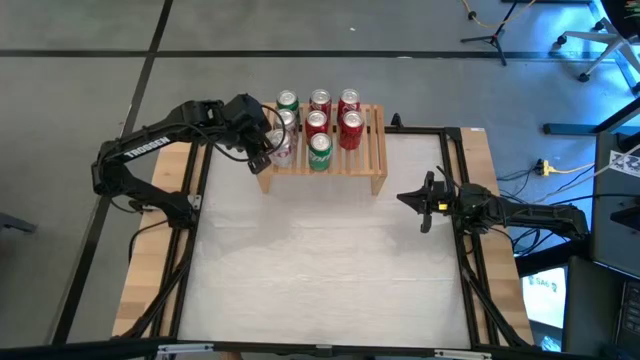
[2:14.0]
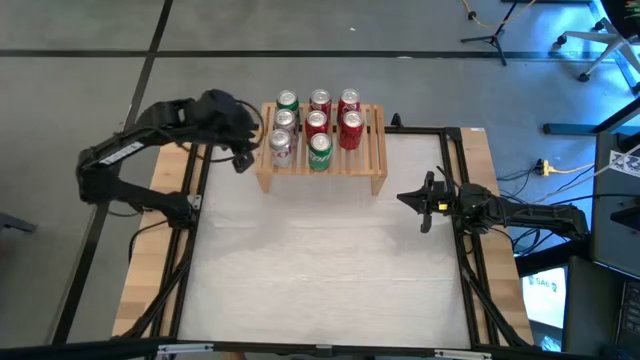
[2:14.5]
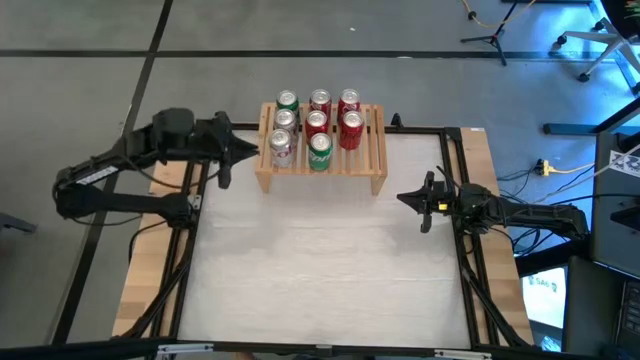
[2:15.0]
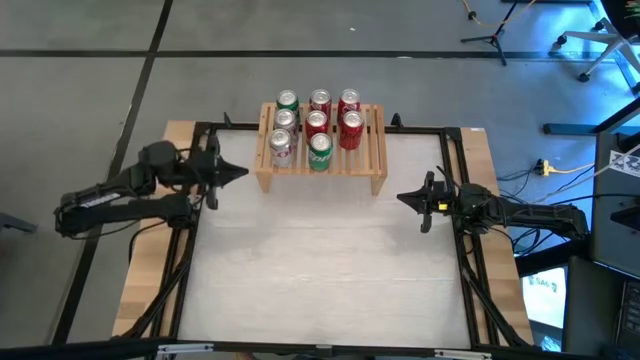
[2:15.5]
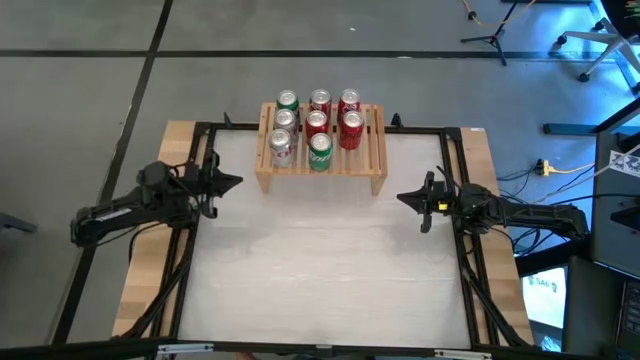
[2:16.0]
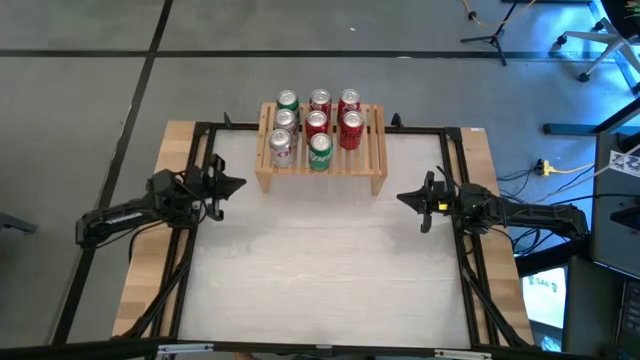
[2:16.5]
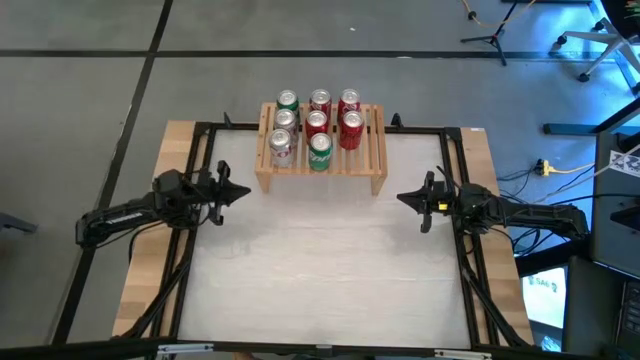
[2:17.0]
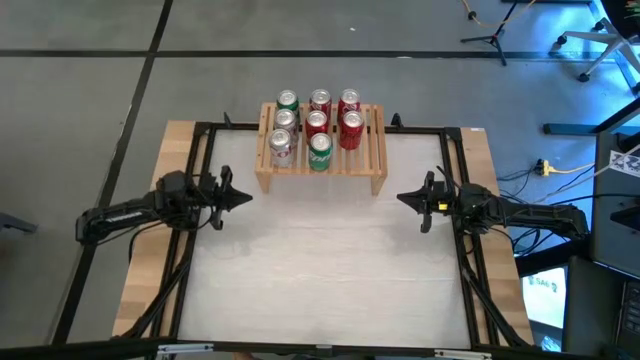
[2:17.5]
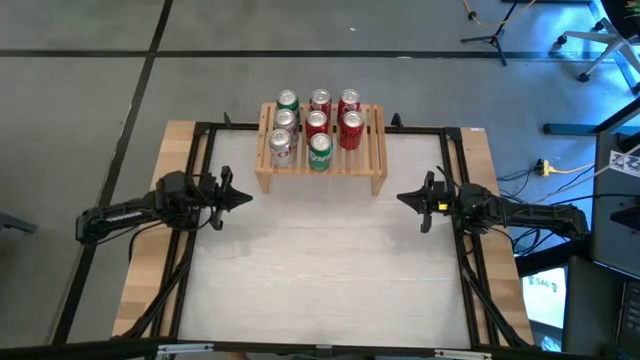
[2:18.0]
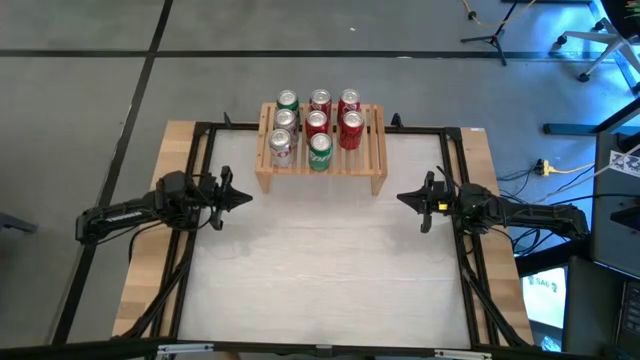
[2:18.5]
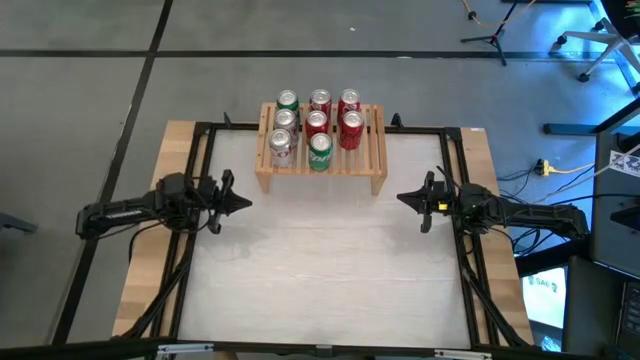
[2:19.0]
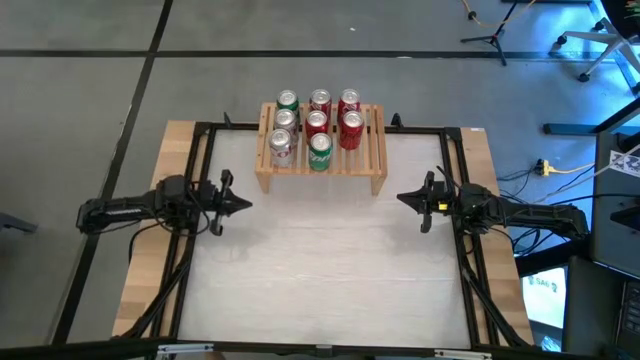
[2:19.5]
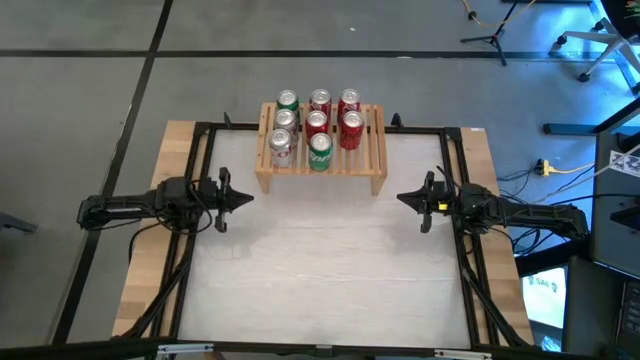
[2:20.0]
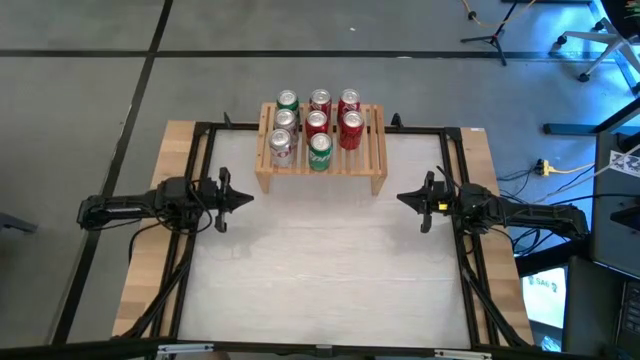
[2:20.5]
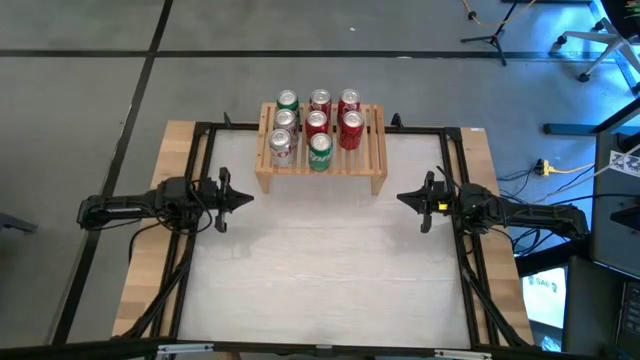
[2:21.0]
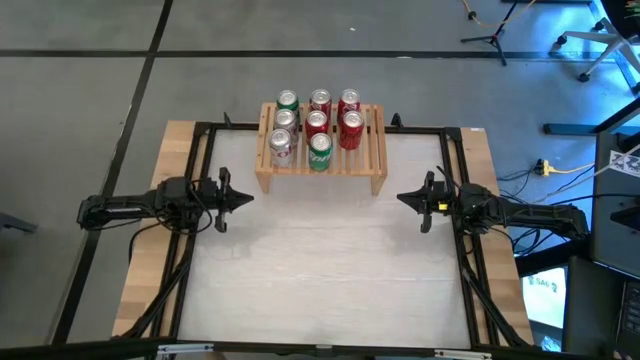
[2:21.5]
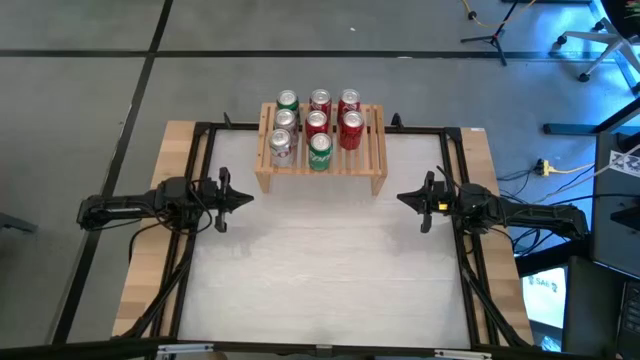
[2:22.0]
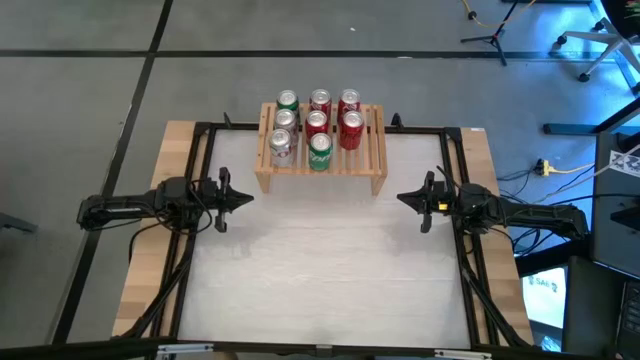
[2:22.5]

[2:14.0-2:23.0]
Task: Place canned beverage on shelf
Return to Home Position

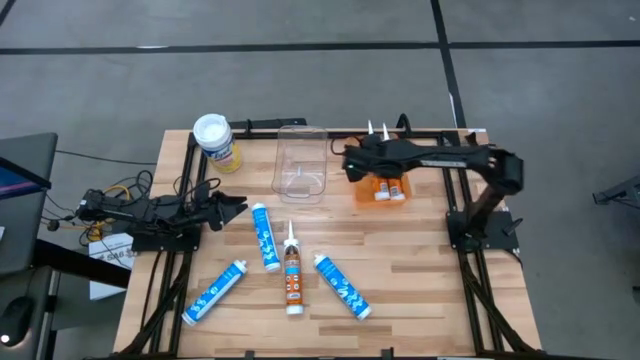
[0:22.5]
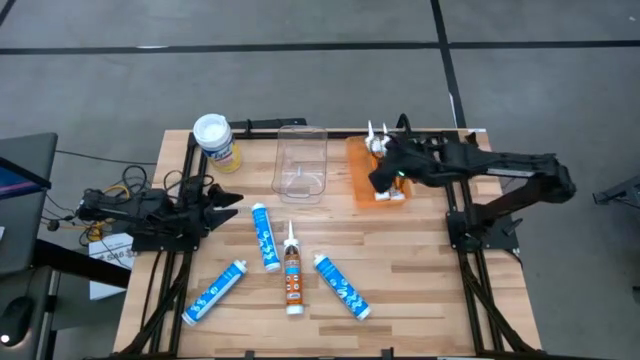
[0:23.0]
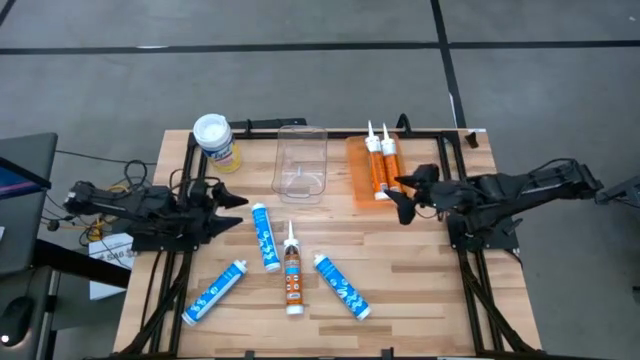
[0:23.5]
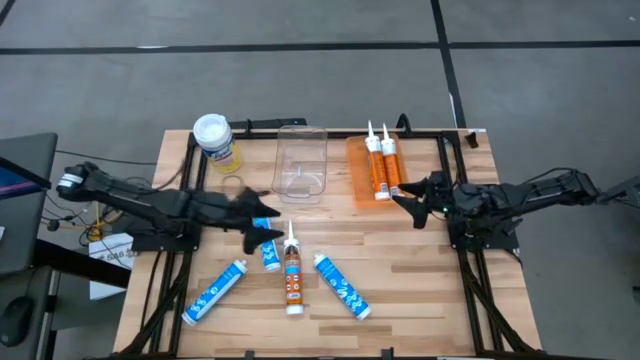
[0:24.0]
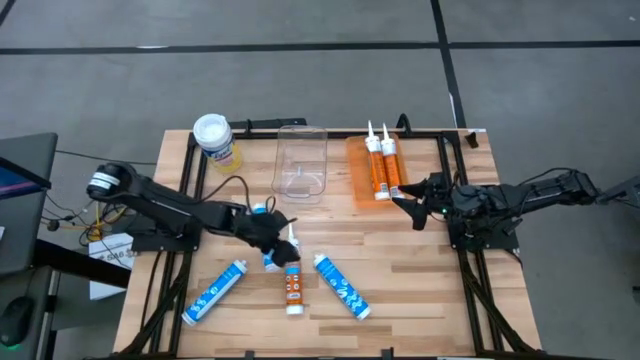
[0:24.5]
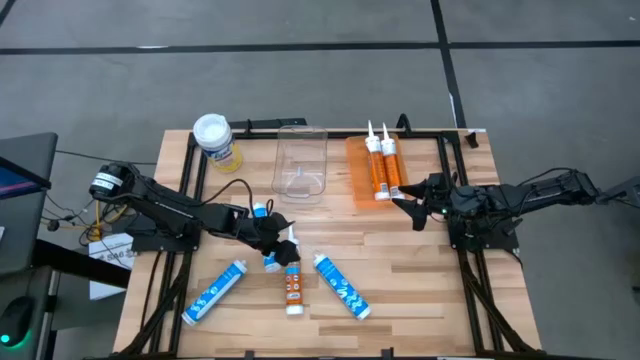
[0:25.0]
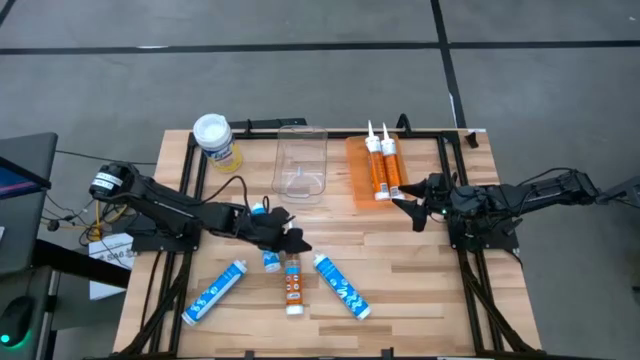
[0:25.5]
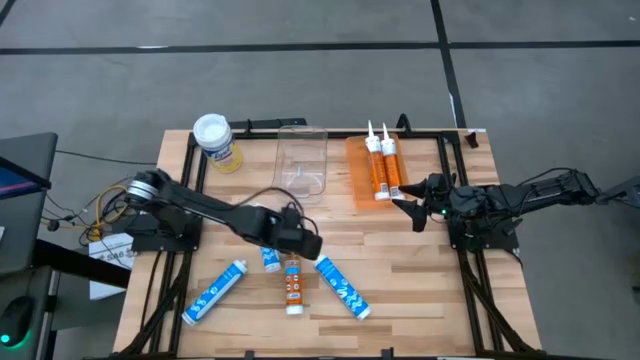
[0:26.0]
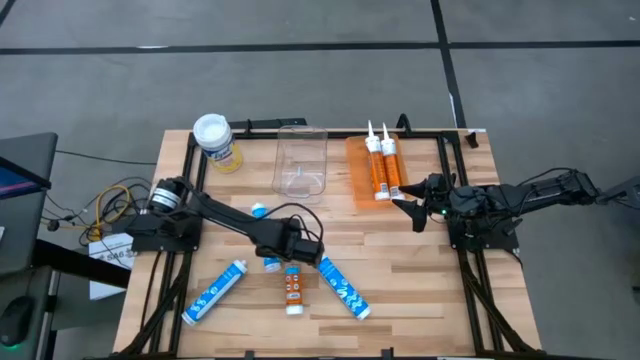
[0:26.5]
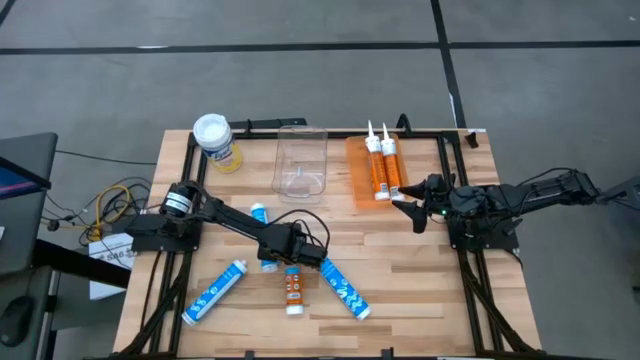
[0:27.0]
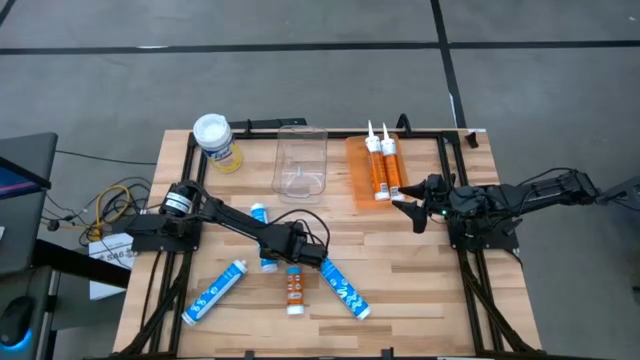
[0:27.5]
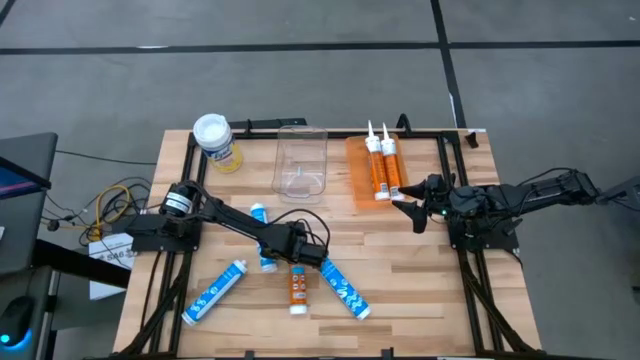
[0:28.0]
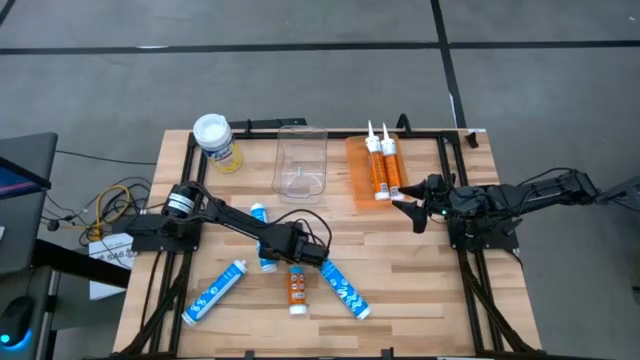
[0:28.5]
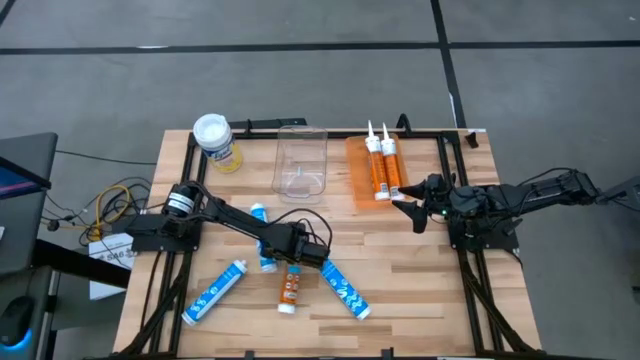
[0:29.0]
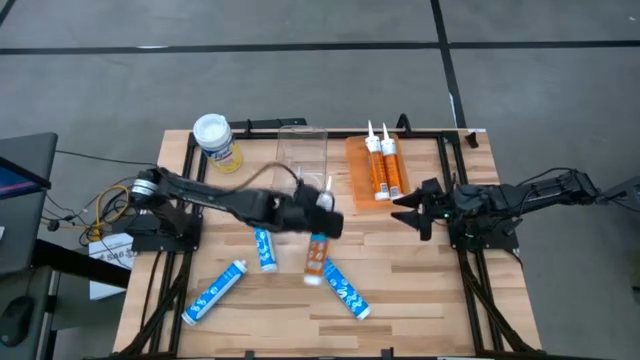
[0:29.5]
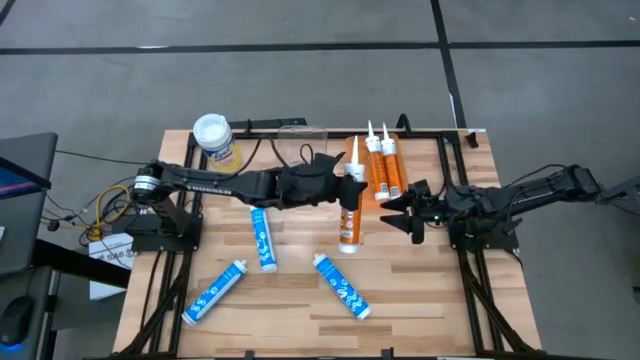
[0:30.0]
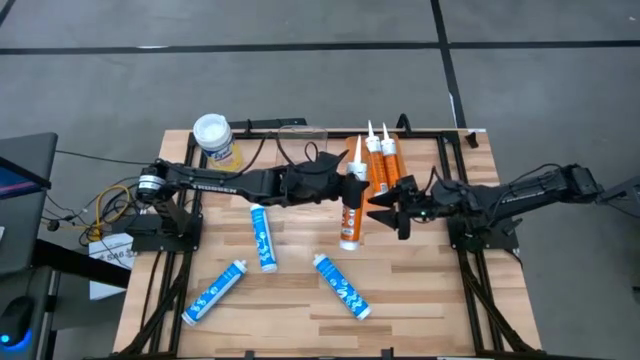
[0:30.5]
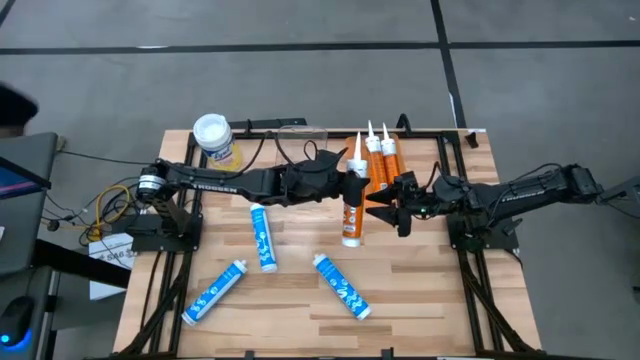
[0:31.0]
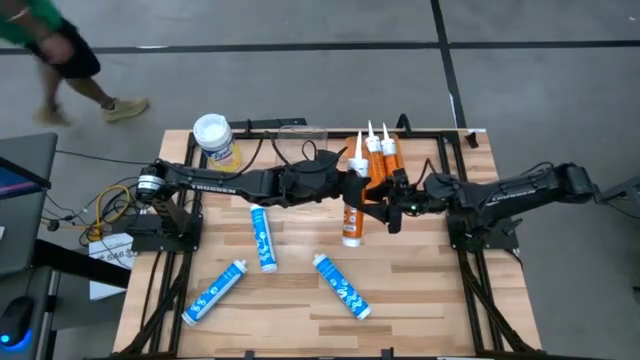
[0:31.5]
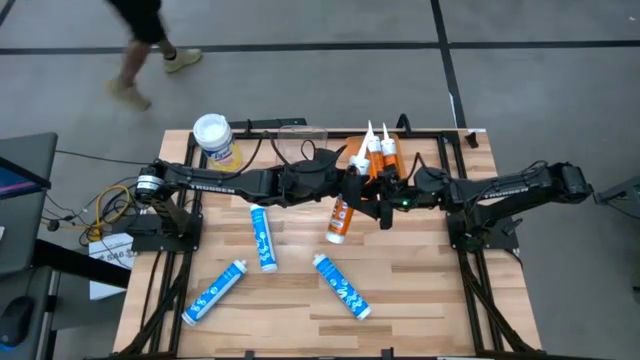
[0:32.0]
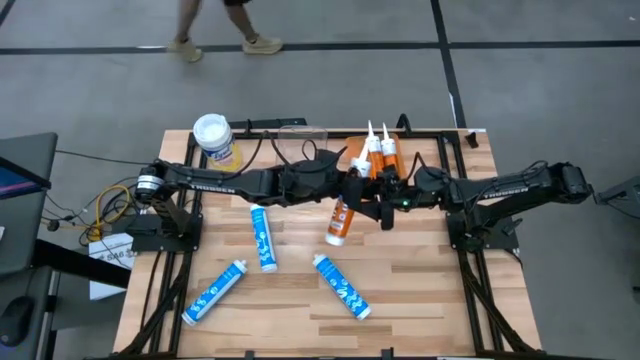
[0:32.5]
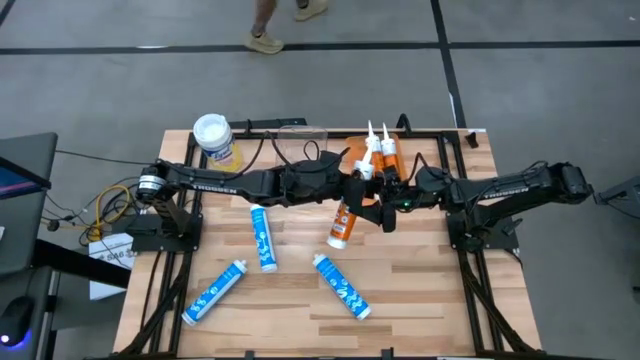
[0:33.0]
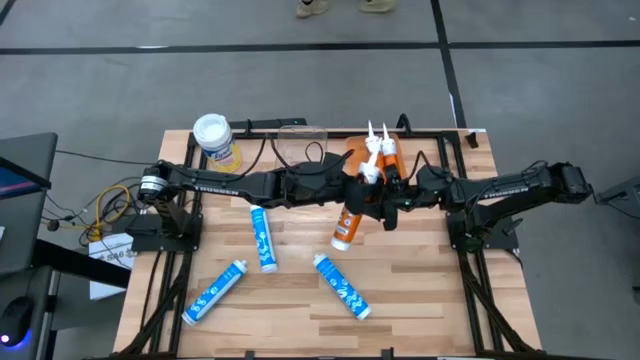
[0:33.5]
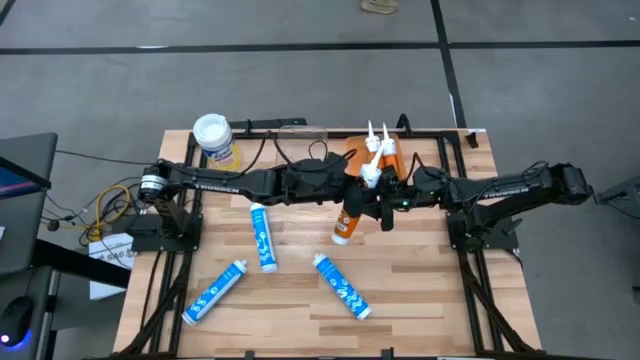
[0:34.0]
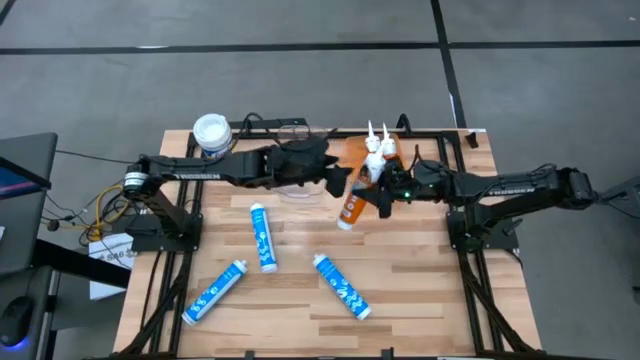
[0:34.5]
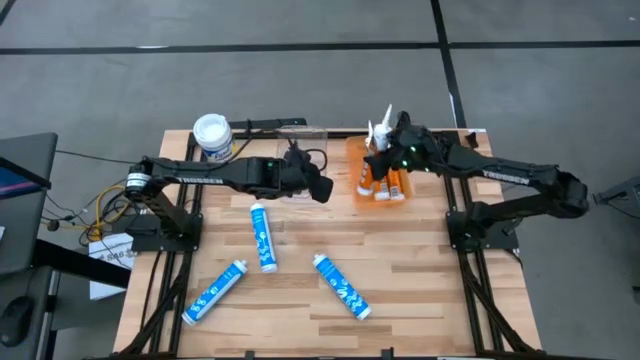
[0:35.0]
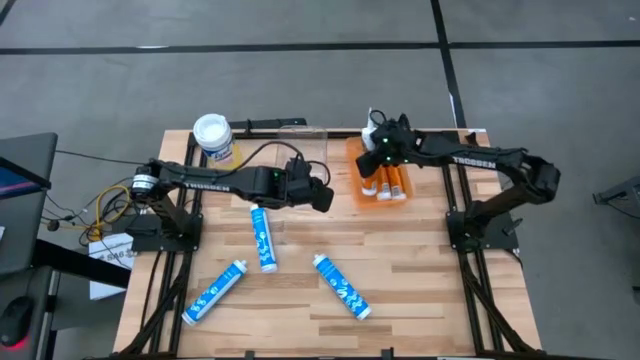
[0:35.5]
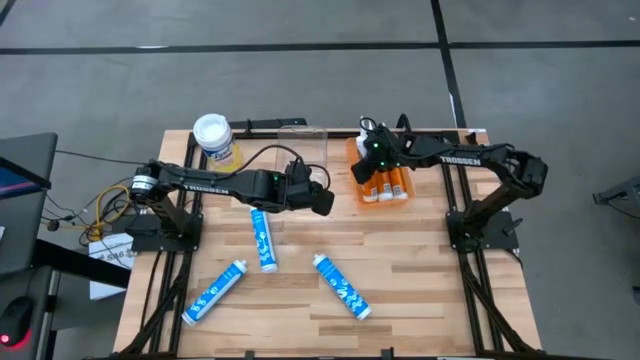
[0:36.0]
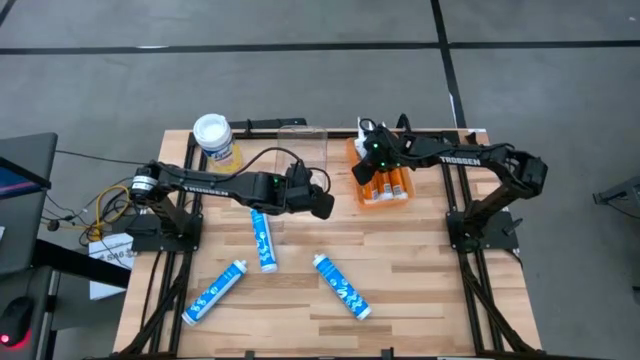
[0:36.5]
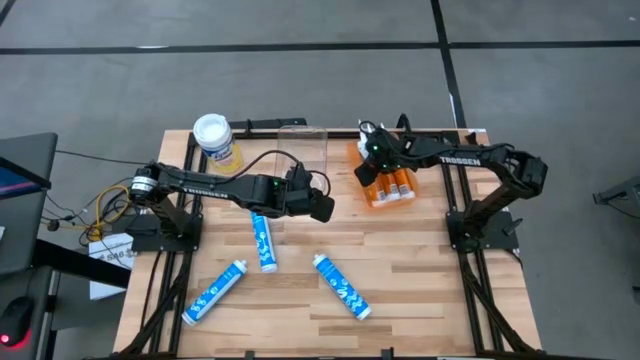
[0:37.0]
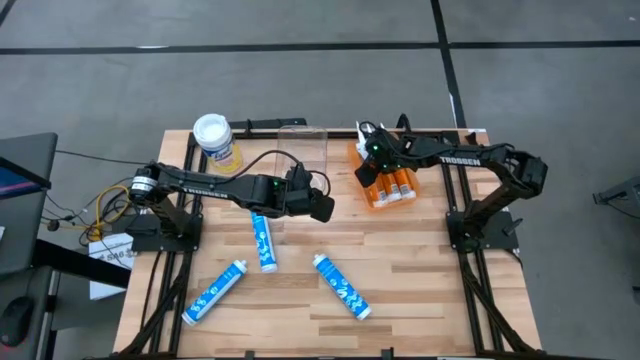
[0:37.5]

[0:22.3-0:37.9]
Task: Pick & place silicon tubes, Sealant and Lysol wipes
Put the orange sealant into the orange bin
